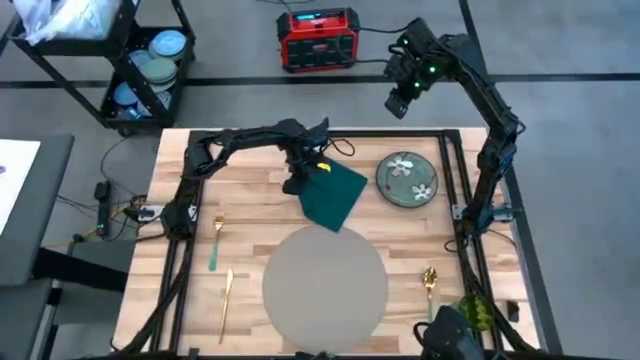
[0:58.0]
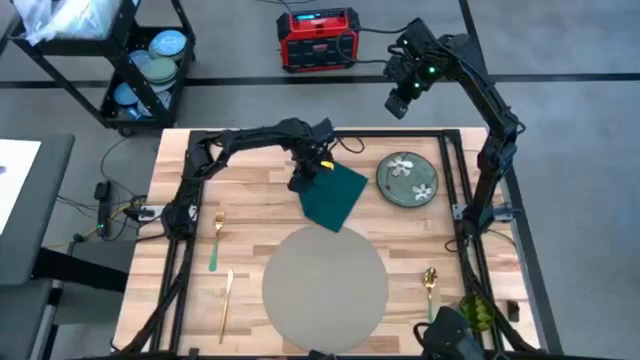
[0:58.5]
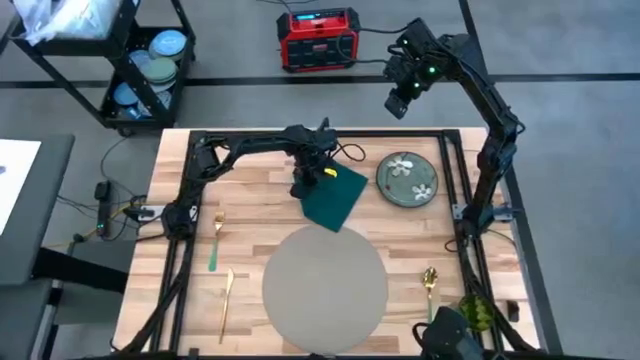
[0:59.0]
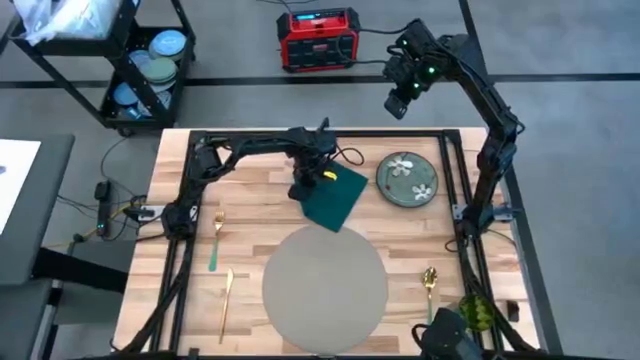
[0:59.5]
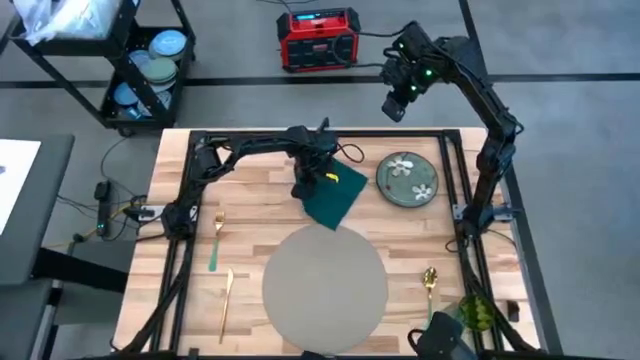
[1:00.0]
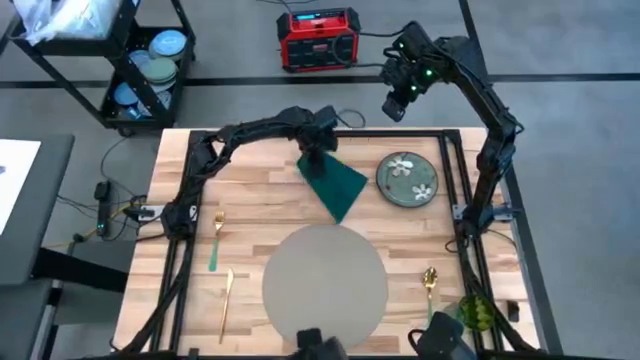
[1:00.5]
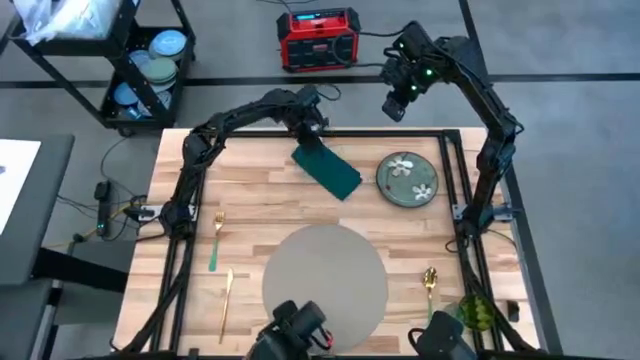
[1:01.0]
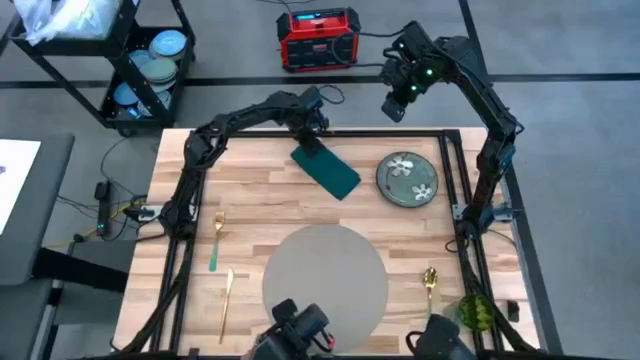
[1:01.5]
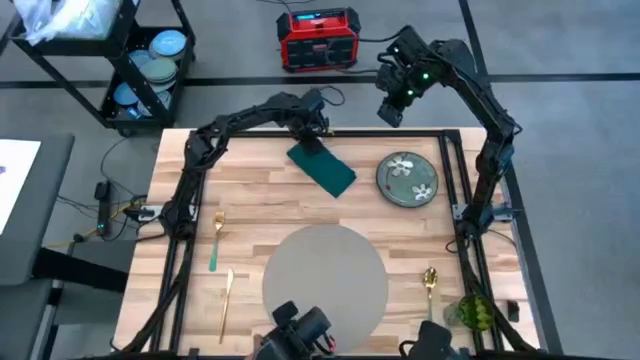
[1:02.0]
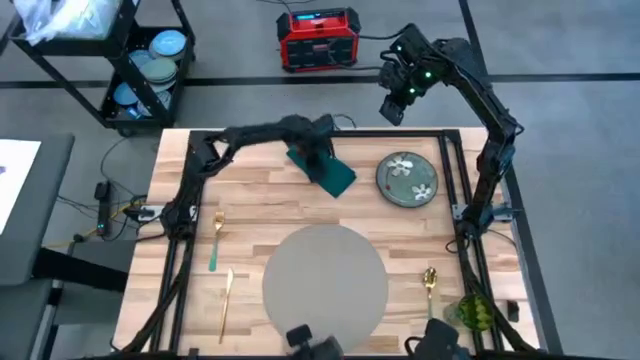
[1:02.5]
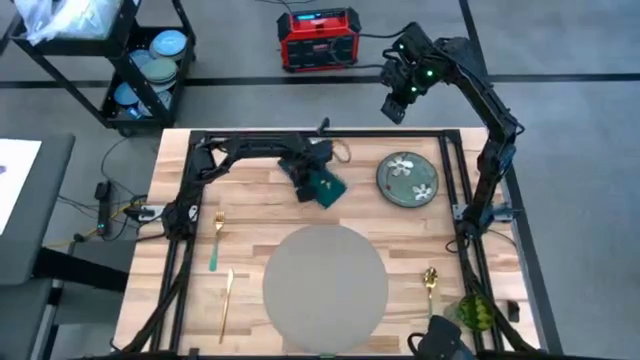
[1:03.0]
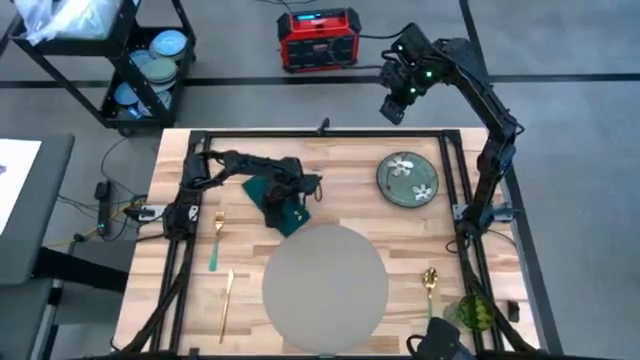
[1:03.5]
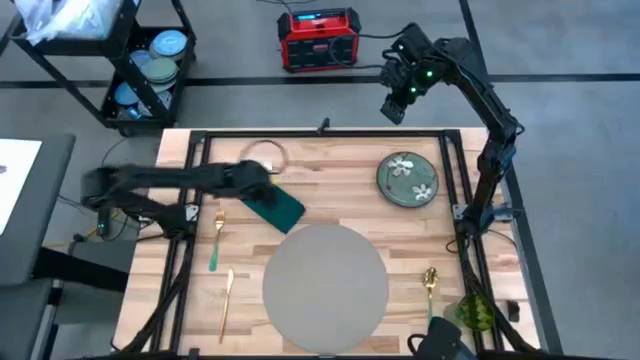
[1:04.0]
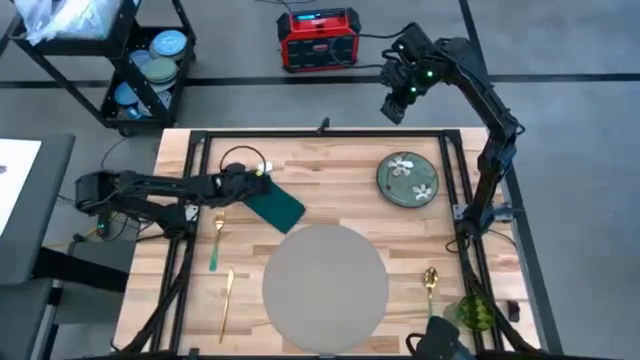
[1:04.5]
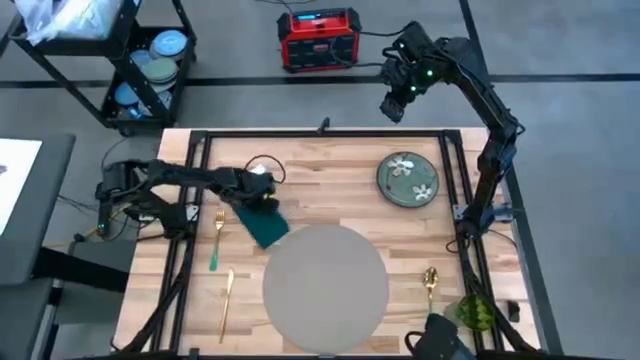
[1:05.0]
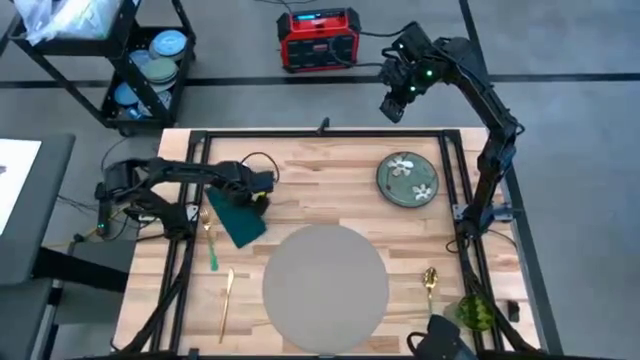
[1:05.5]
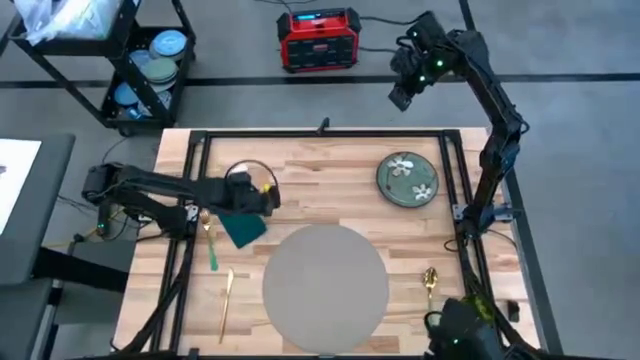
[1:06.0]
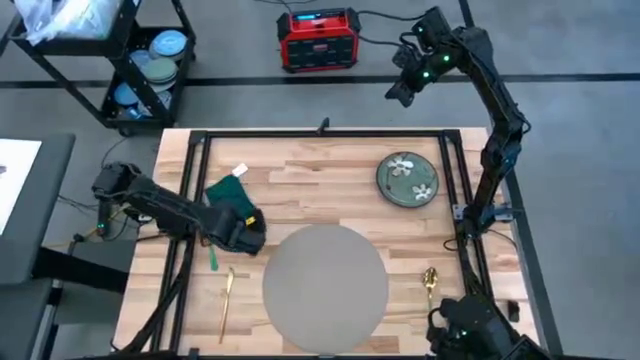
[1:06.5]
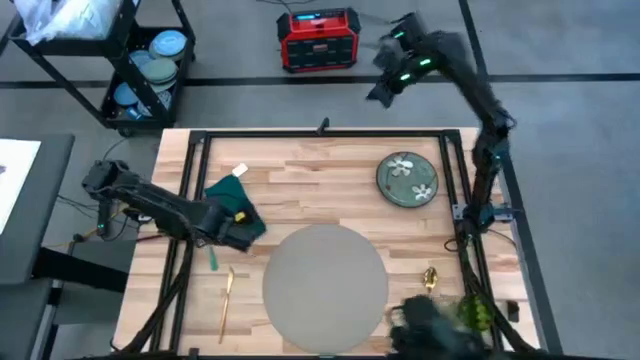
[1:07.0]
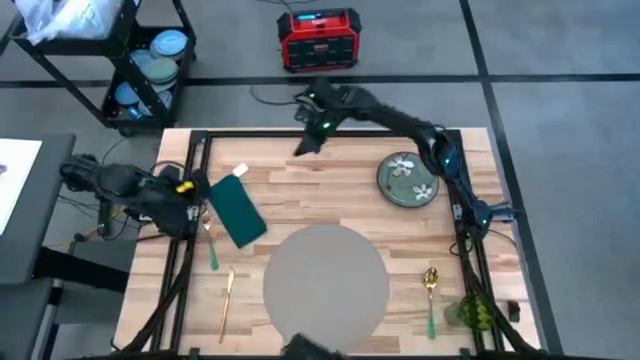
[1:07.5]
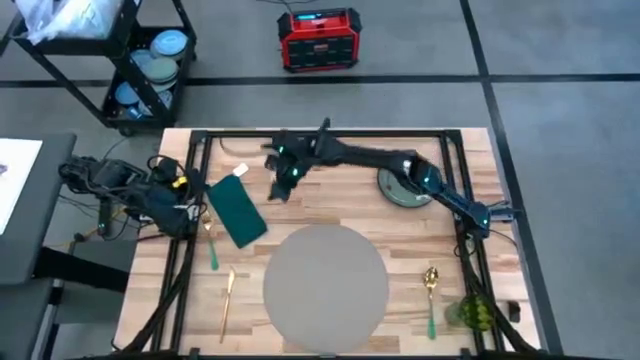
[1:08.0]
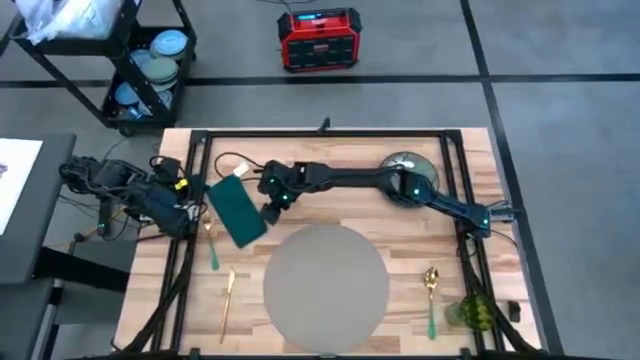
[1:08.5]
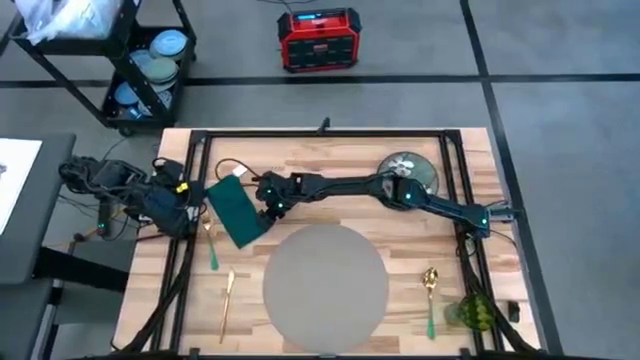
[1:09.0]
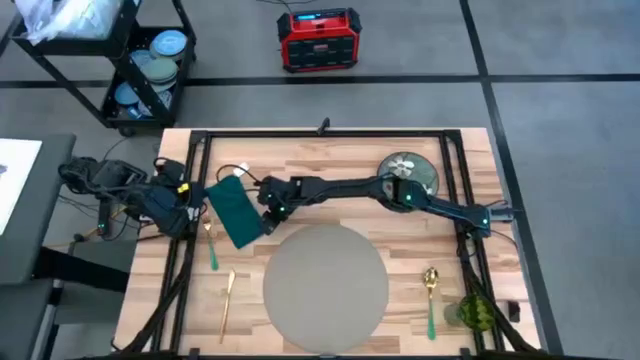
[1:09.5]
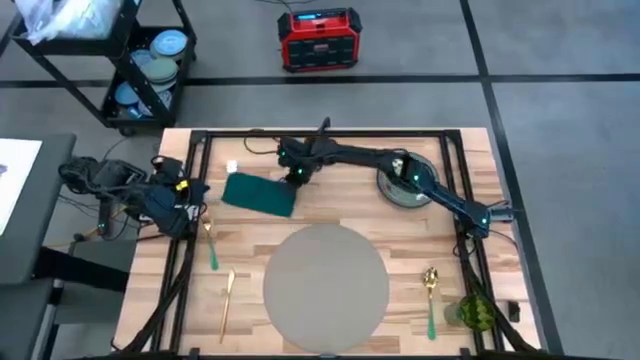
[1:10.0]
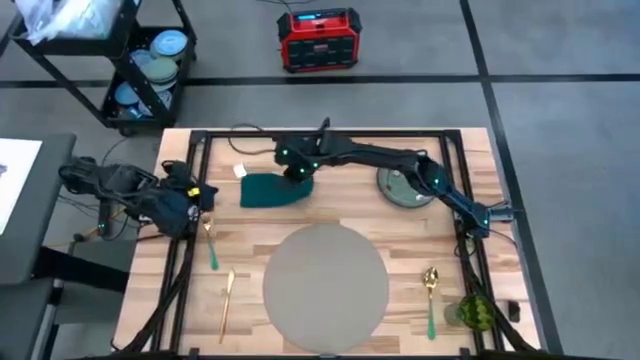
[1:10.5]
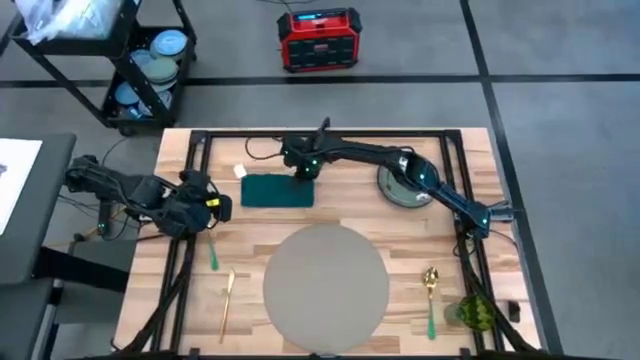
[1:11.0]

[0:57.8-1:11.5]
Task: Set table place
Fold the green napkin

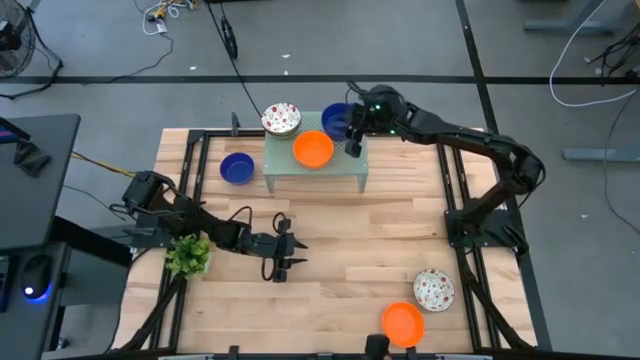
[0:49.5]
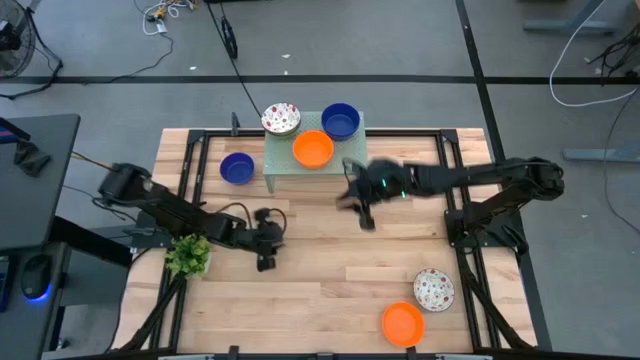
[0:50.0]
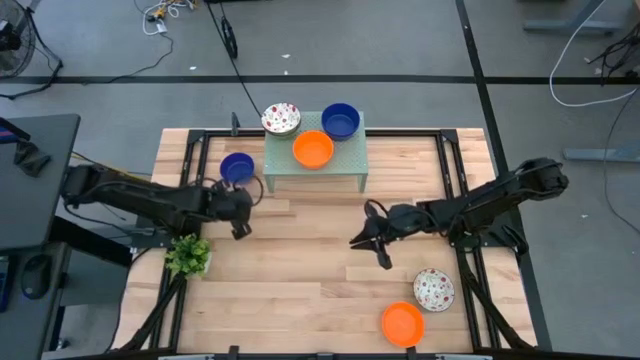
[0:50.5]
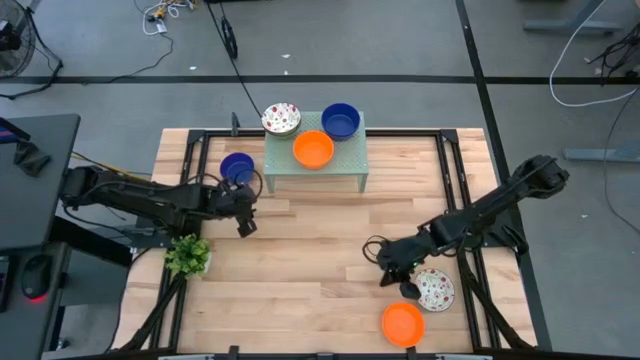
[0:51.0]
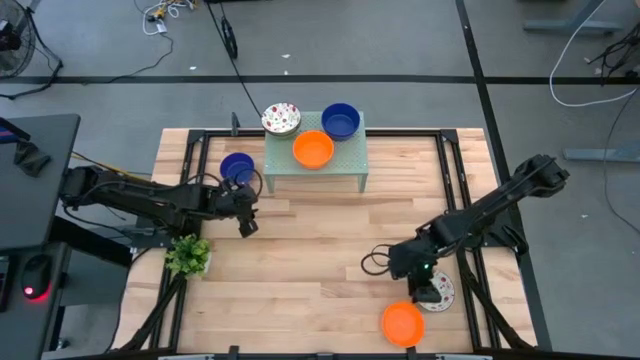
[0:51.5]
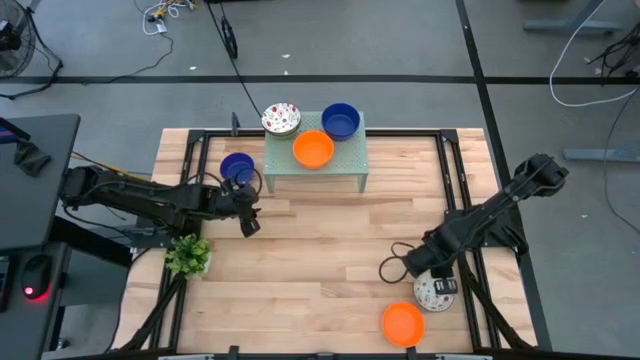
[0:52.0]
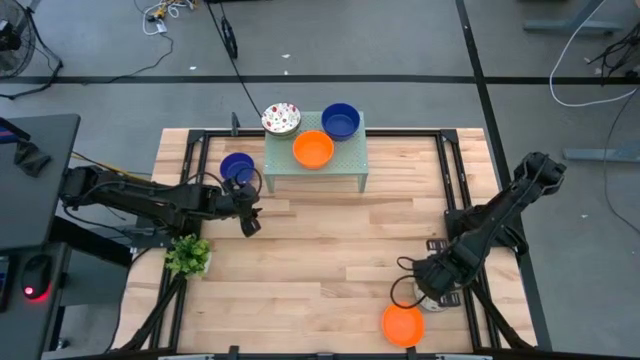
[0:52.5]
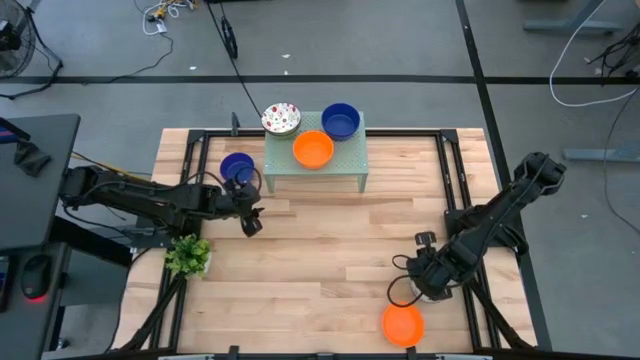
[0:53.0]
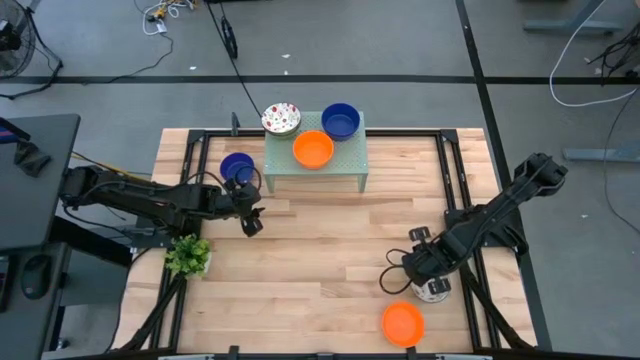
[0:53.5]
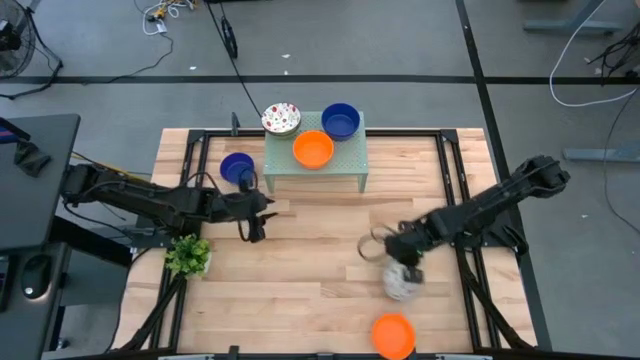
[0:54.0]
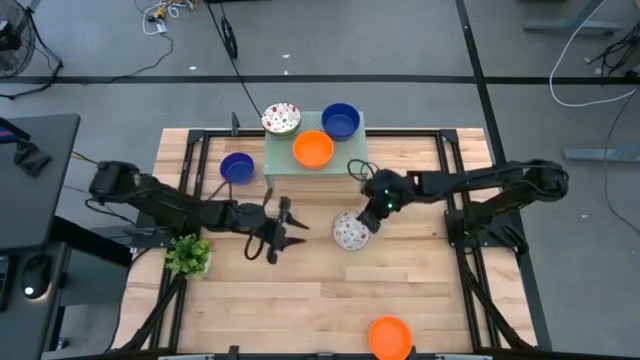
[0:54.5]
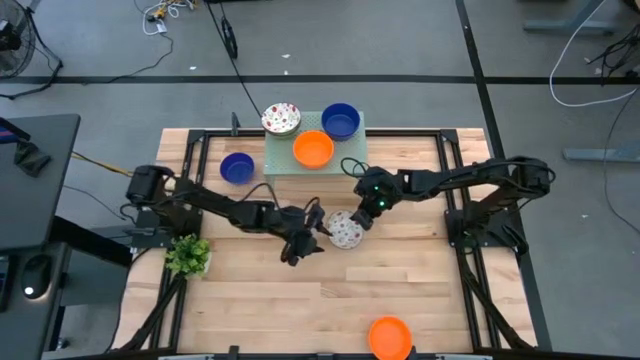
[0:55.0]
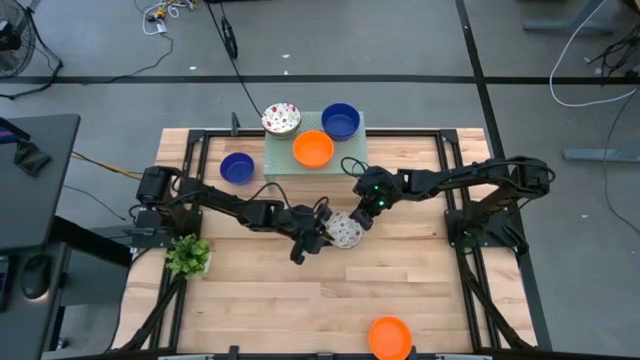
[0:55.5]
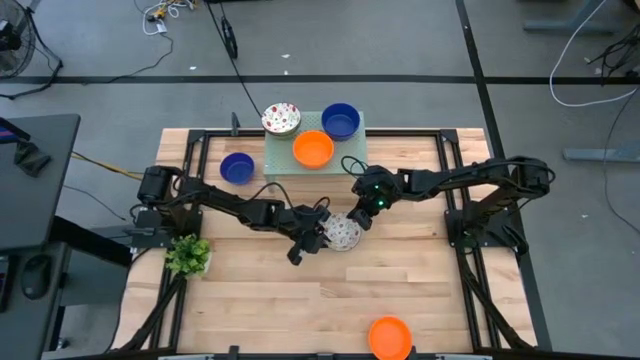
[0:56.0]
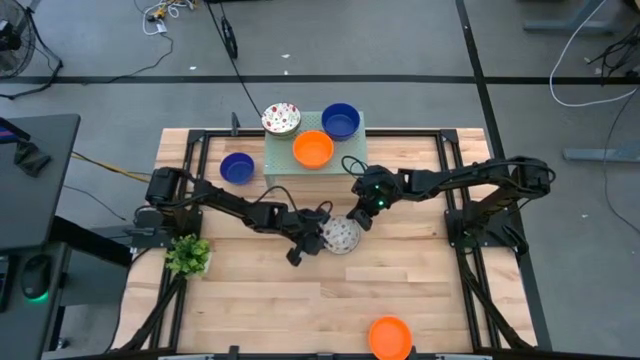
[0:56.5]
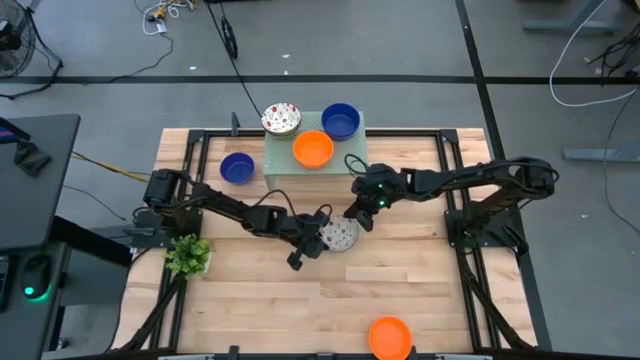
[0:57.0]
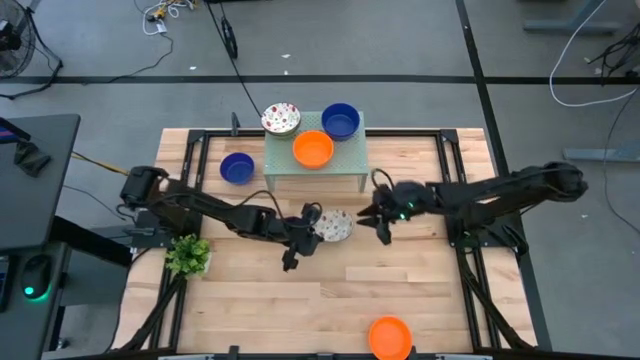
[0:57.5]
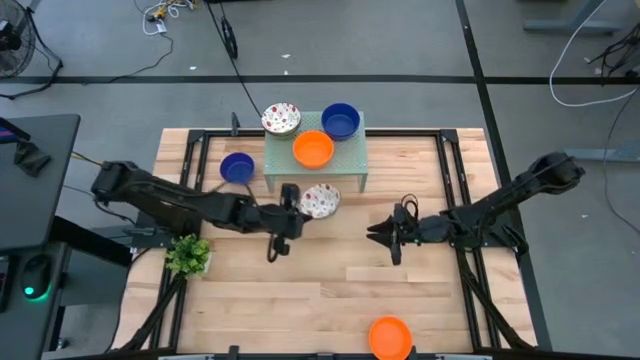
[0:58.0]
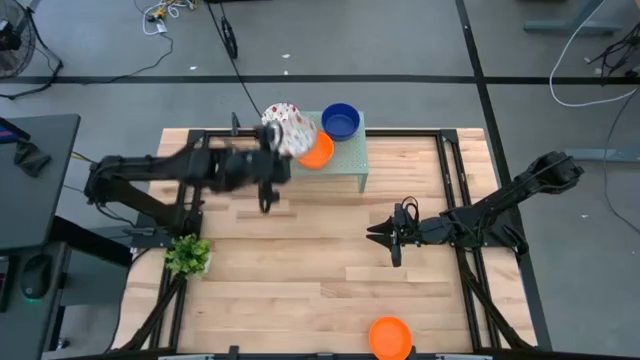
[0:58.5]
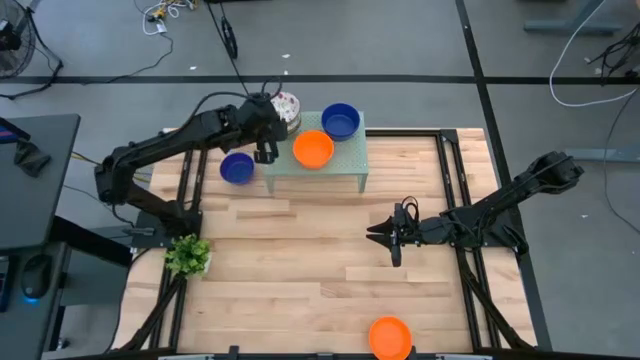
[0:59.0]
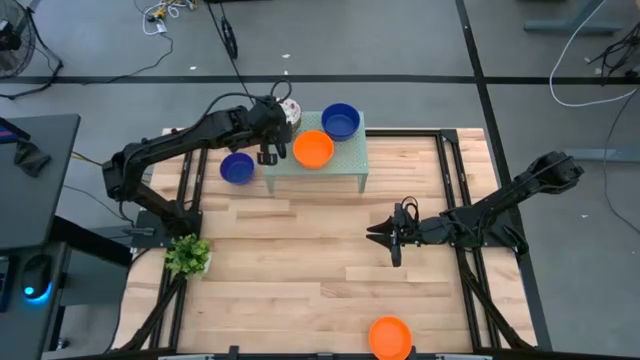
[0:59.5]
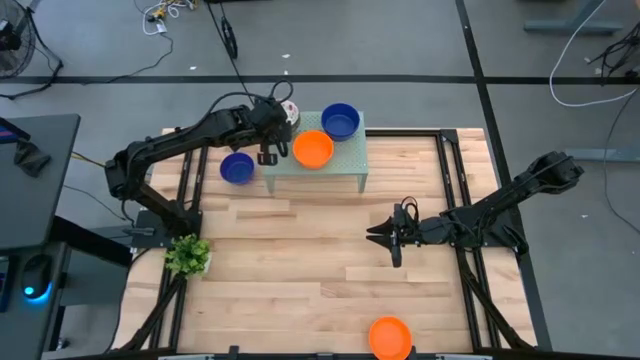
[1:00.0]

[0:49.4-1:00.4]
Task: Pick & Place Mini bowls
Stack the white patterned bowl on the white patterned bowl on the shelf
